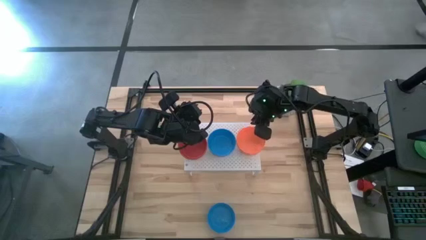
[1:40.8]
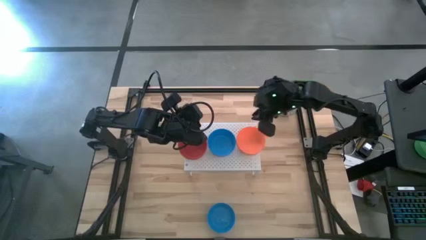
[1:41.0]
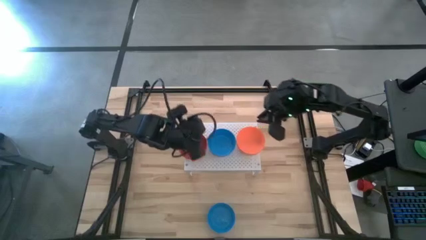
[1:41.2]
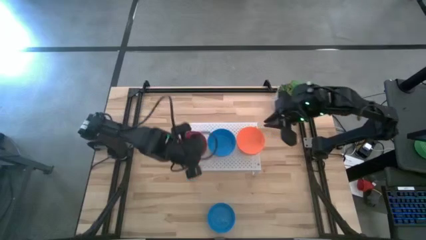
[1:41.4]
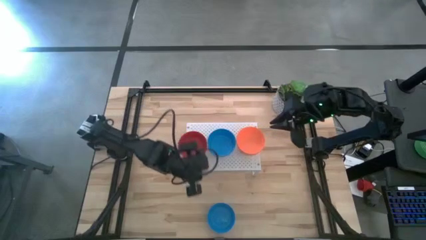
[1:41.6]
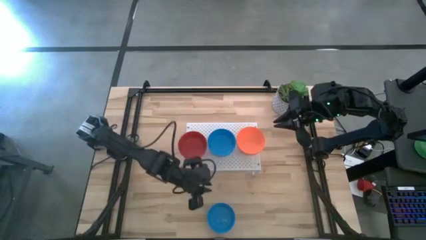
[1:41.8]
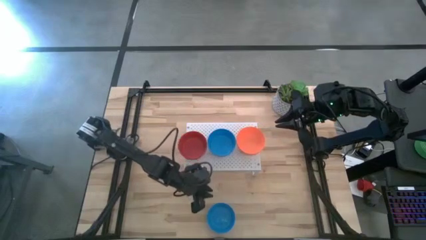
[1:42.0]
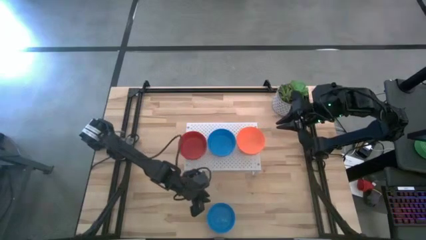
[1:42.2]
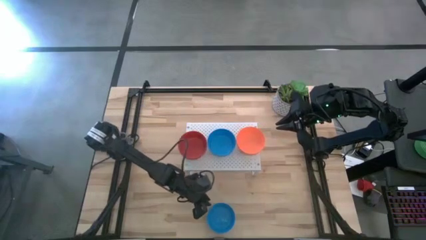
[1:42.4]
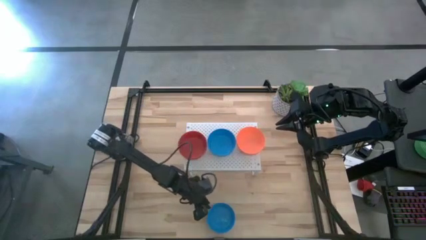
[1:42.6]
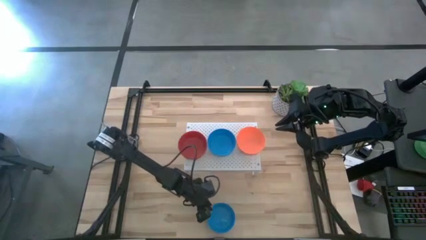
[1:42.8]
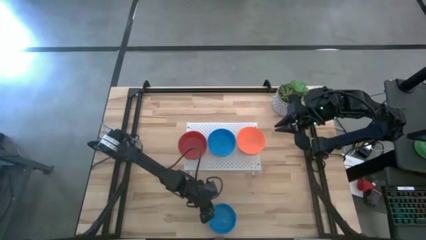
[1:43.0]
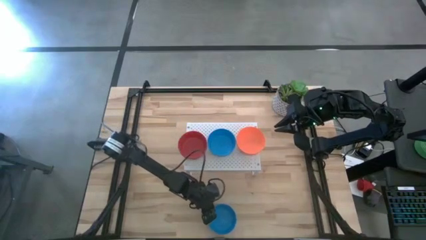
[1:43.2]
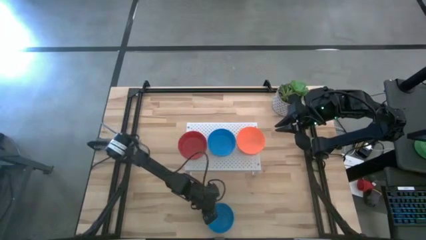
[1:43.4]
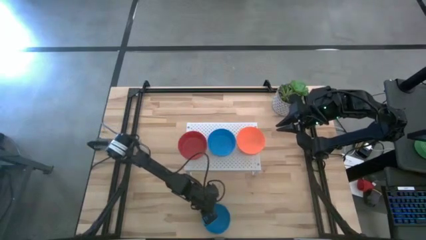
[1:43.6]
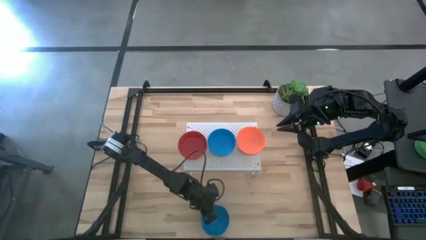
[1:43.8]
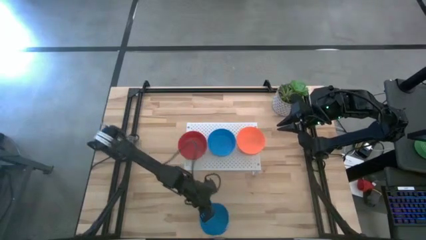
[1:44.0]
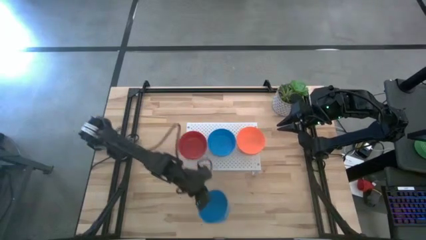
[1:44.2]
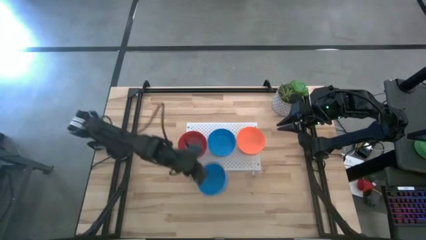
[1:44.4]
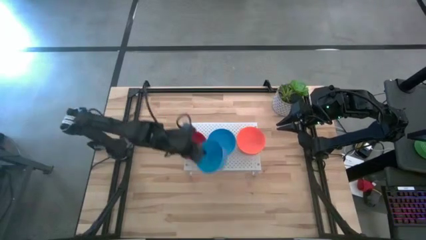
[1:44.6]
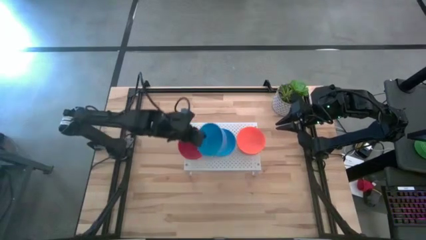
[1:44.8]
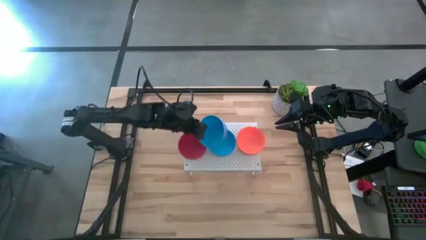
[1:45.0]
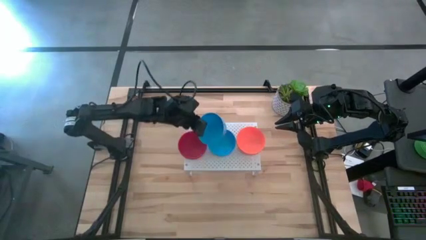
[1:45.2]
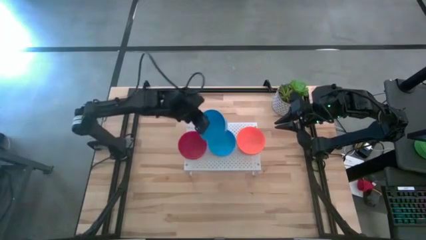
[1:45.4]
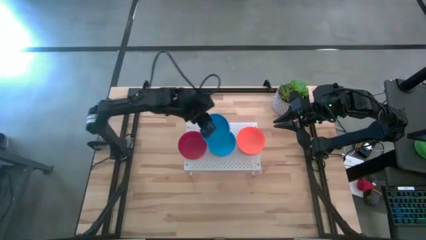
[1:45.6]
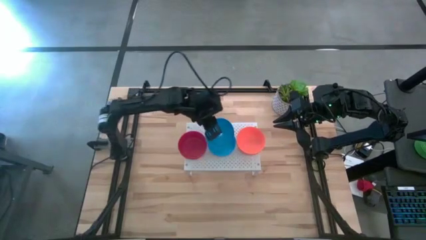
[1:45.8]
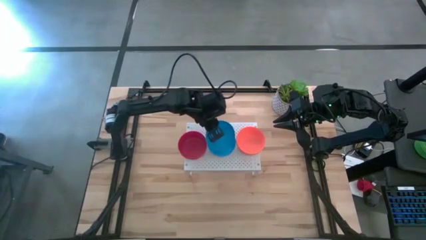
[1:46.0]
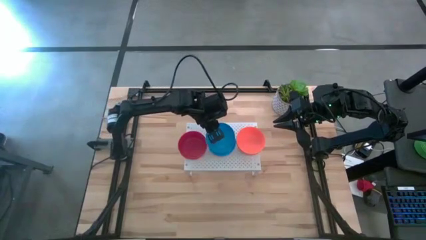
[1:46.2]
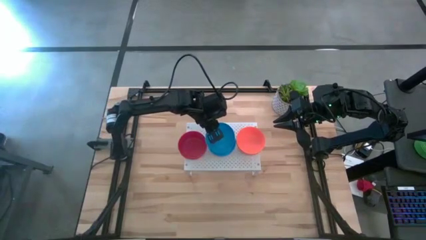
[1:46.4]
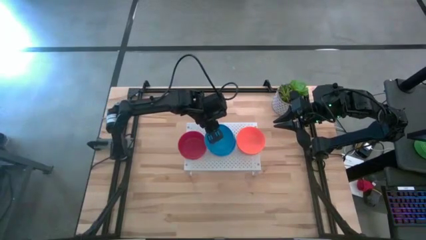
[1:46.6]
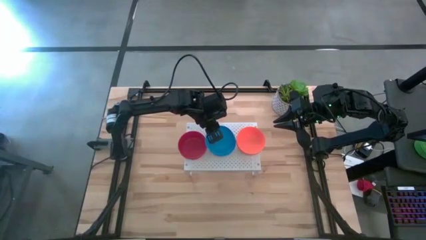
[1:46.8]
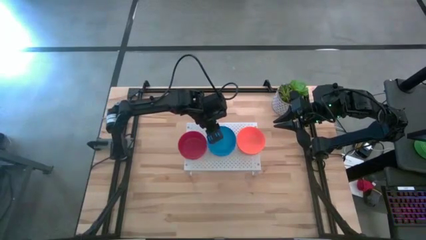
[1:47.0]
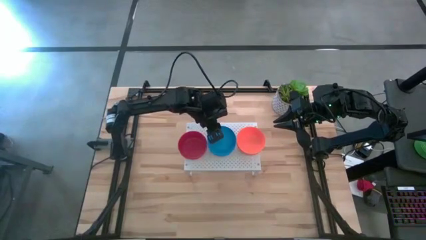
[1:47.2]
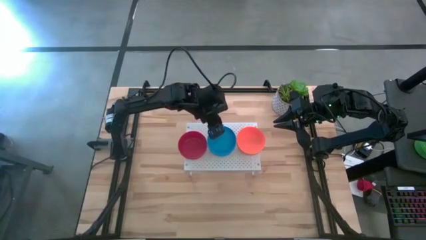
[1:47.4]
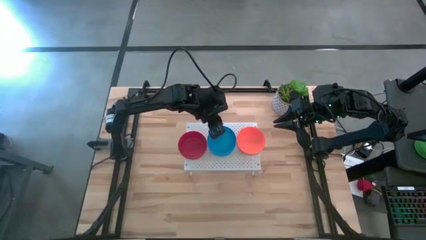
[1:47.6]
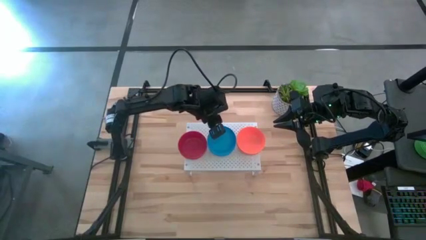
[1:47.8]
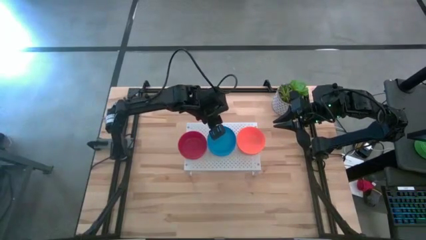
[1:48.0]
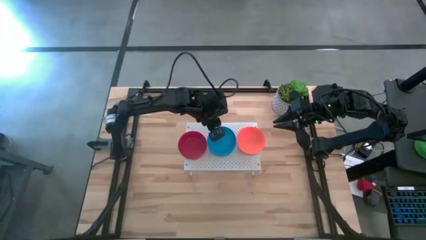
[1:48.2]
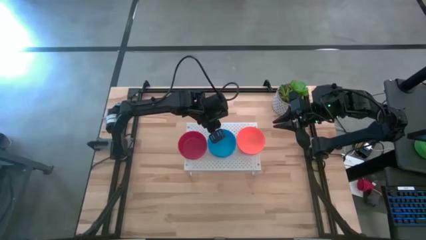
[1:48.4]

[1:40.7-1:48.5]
Task: Pick & Place Mini bowls
Stack the blue bowl on the blue bowl on the shelf

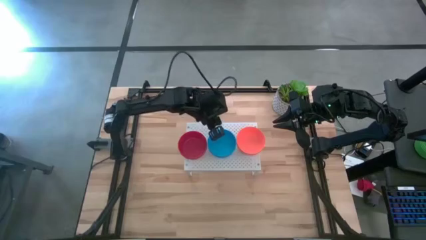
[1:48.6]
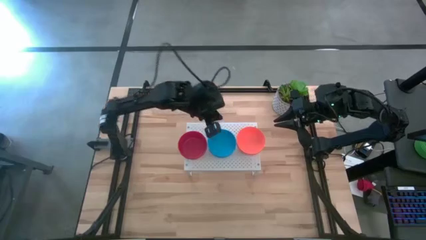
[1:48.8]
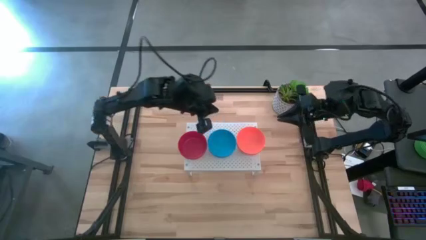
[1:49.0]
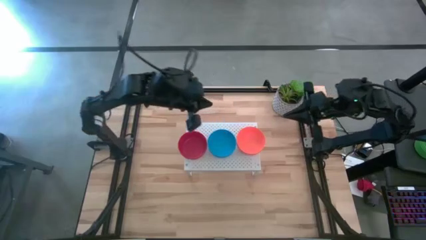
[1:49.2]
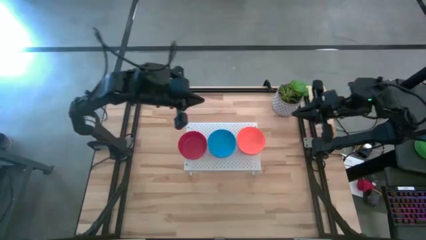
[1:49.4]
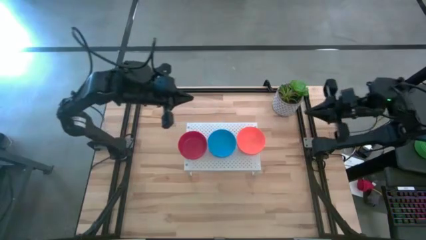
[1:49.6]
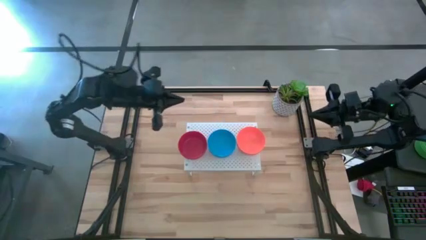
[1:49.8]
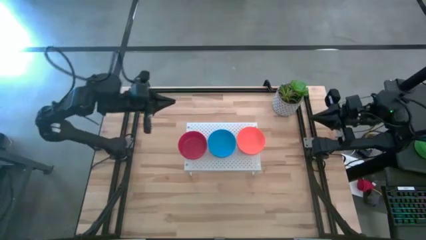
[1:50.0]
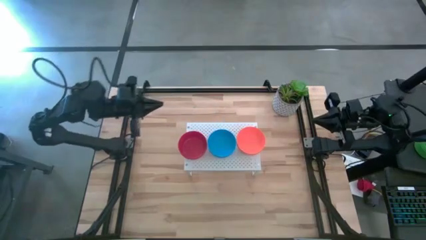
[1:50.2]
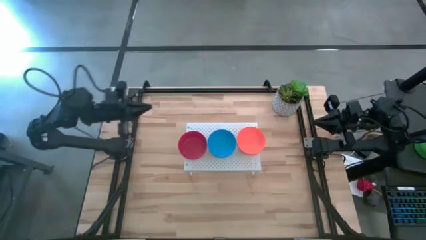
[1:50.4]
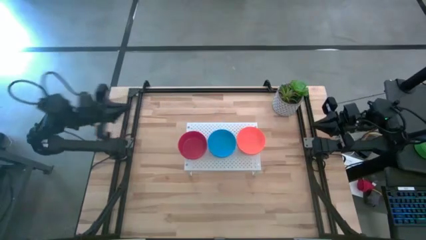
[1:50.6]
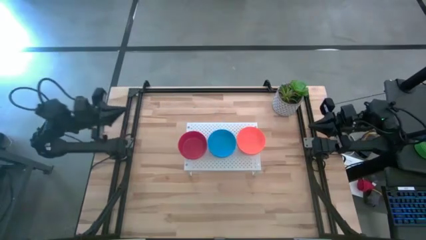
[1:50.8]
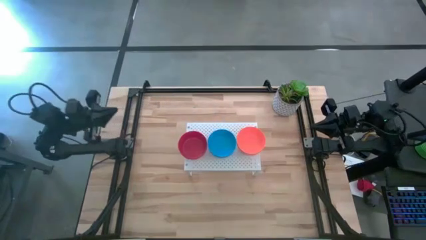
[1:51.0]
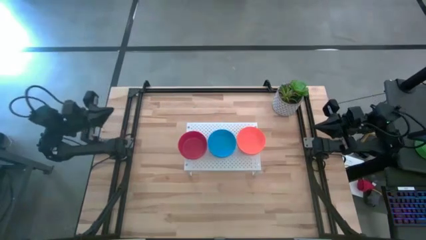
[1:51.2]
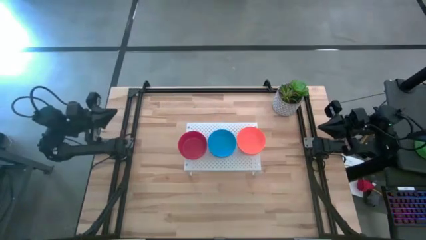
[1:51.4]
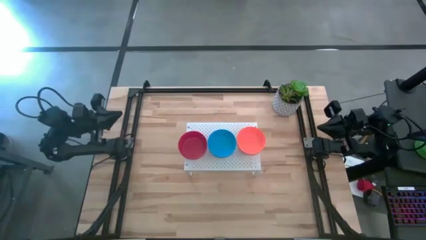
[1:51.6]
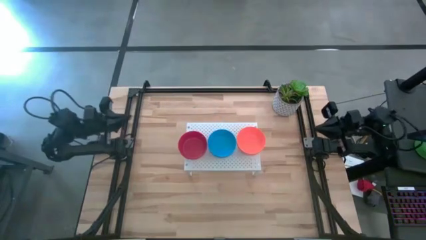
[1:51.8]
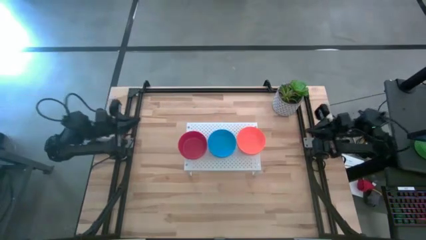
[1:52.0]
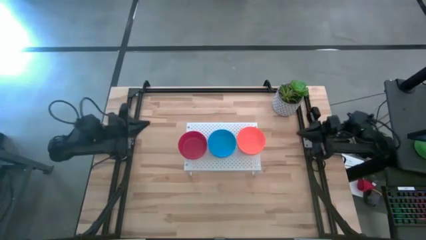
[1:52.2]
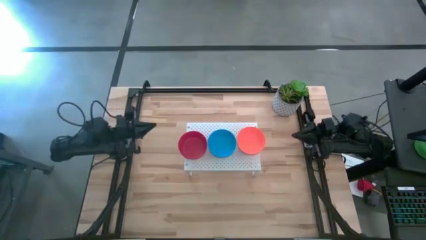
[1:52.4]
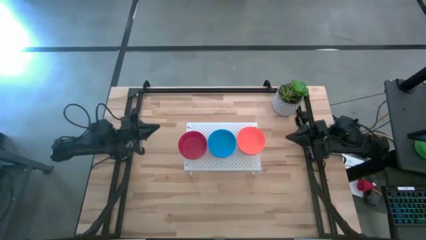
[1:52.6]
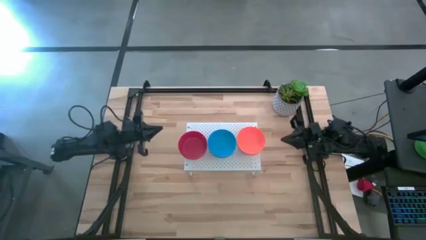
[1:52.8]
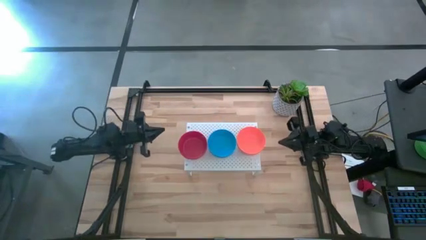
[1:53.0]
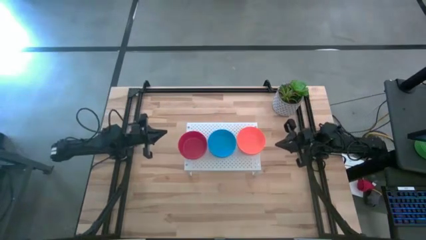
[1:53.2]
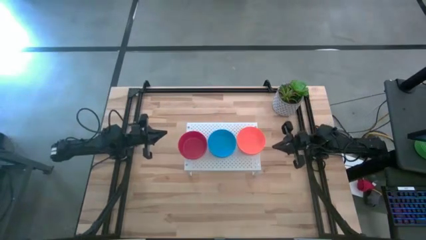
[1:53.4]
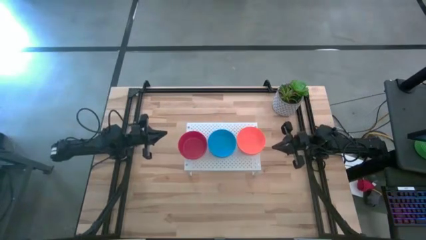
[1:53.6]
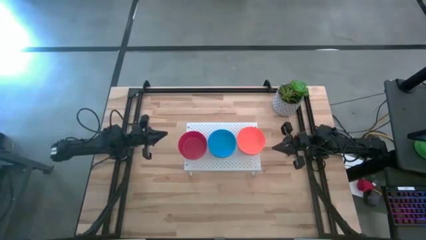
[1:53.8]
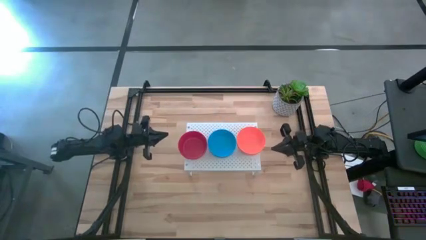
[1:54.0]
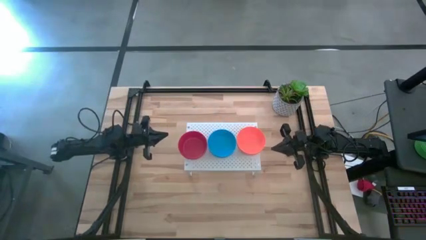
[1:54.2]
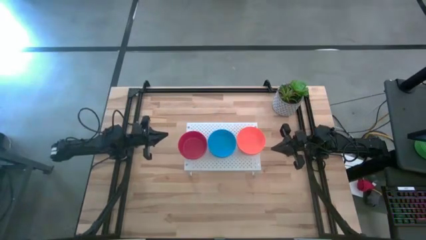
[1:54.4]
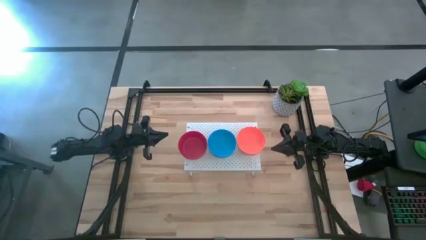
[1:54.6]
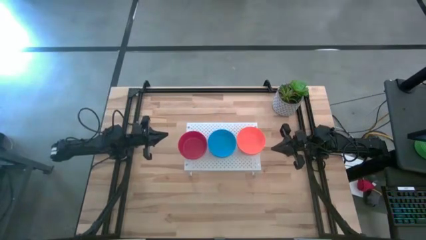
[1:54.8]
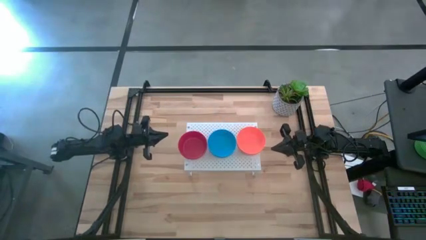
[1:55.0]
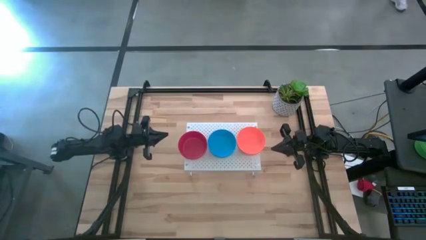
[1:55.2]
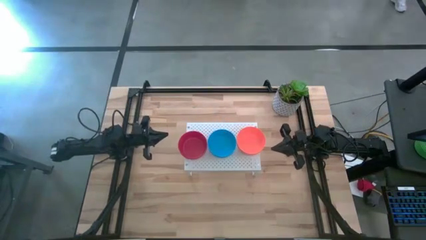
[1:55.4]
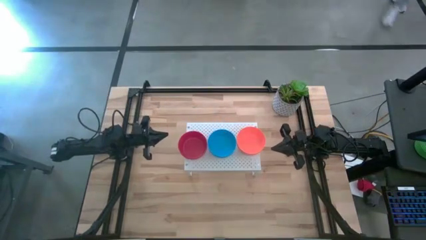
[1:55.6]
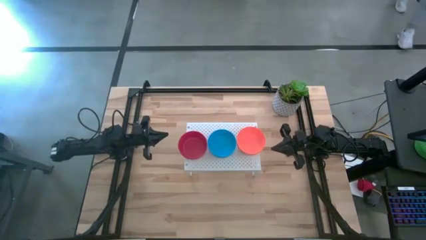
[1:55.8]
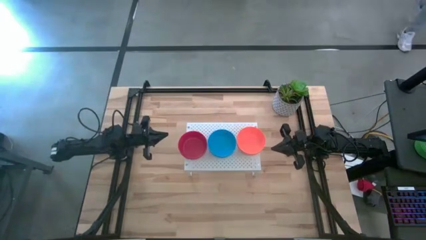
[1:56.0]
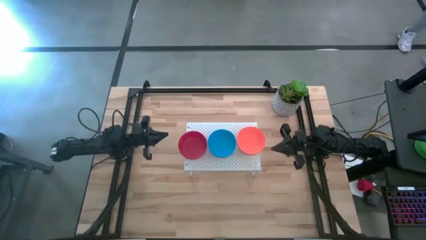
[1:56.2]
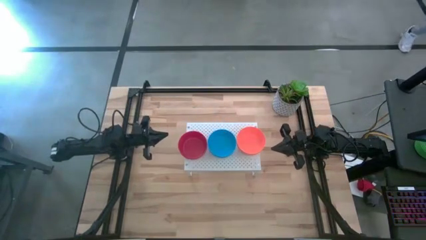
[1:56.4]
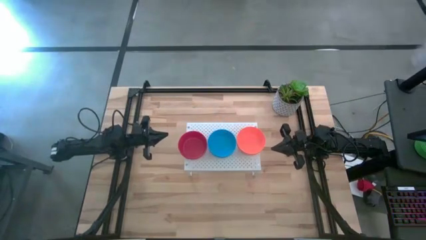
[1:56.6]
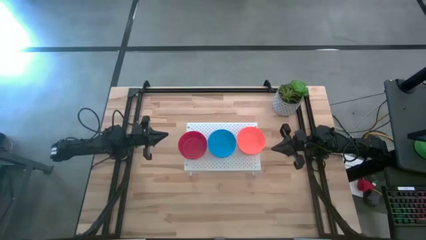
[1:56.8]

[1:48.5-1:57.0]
Return to Home Position

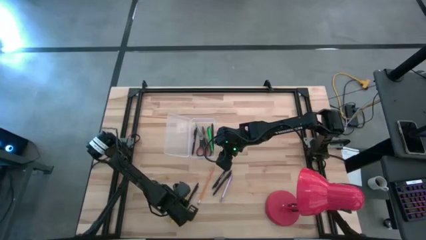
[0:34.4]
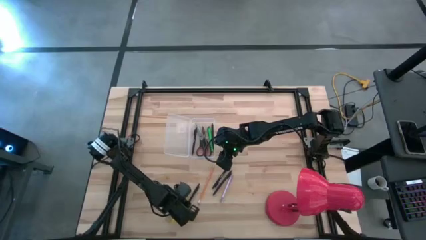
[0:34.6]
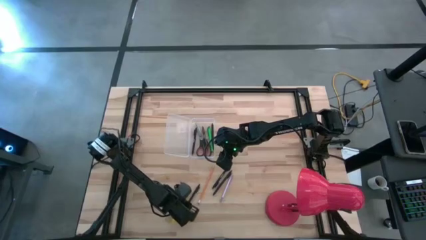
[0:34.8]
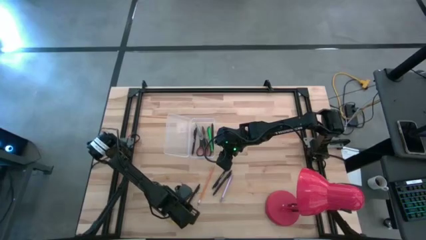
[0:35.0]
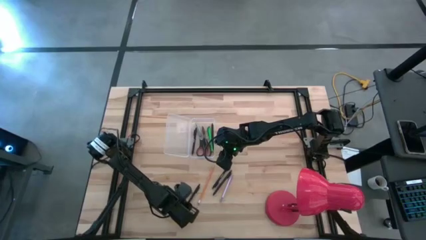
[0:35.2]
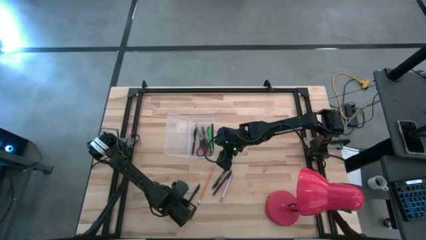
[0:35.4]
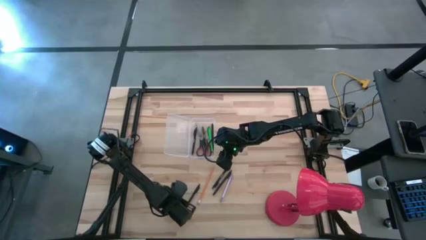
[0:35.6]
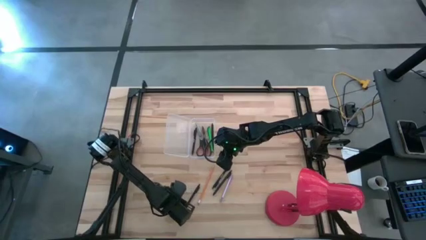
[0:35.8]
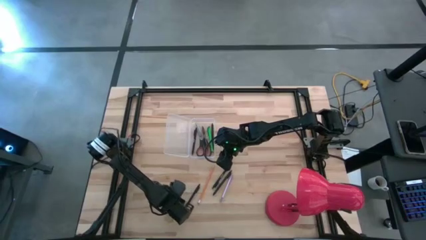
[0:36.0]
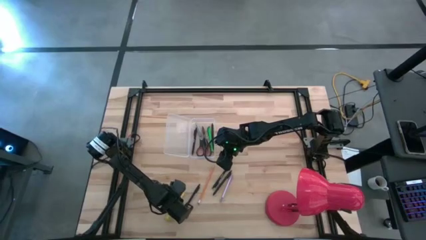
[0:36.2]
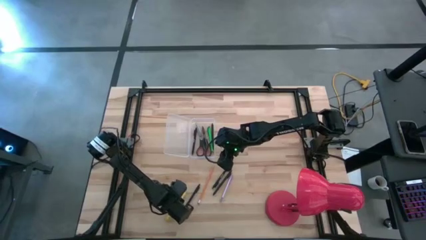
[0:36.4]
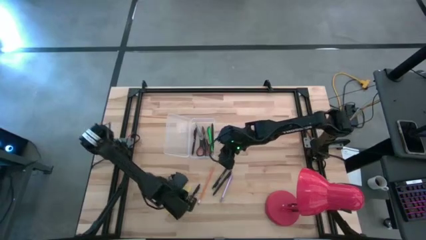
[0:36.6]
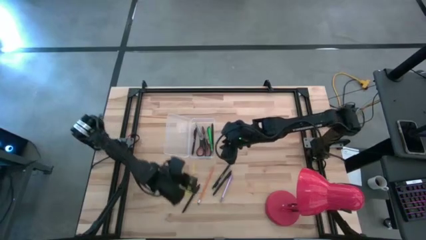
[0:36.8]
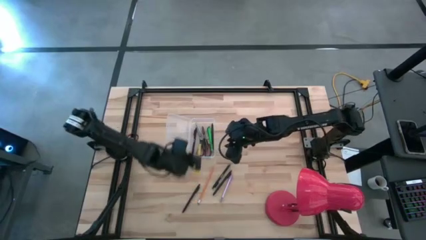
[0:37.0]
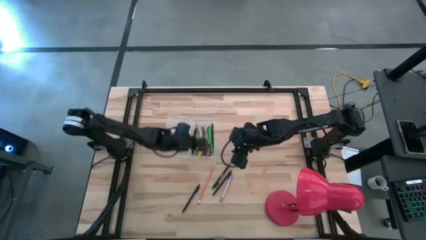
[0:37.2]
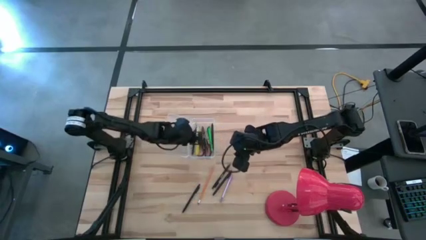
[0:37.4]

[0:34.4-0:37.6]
Task: Pick & place school supplies into a supply box
Put the yellow pen into the transparent supply box
